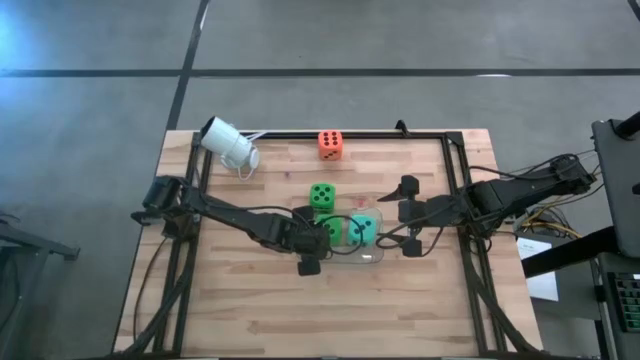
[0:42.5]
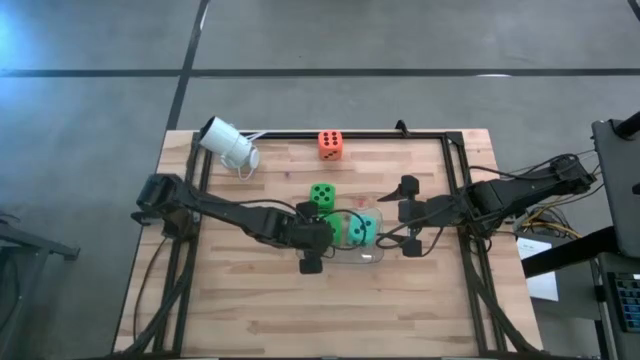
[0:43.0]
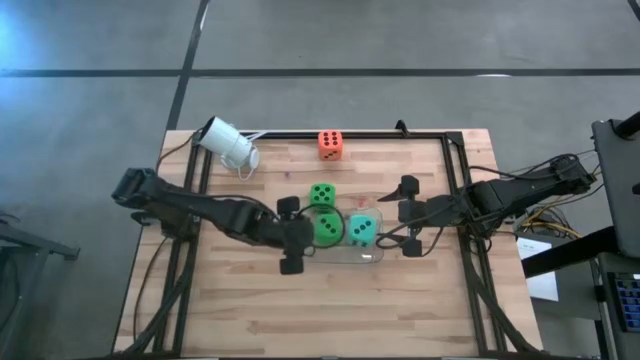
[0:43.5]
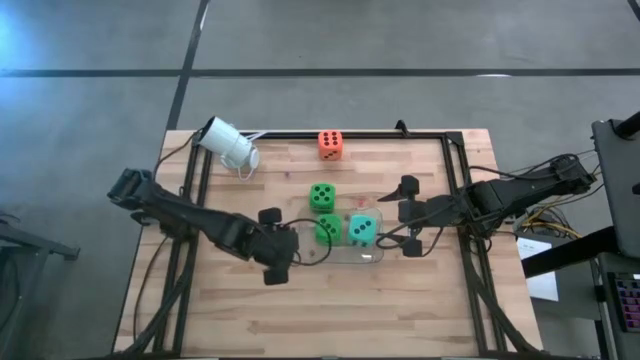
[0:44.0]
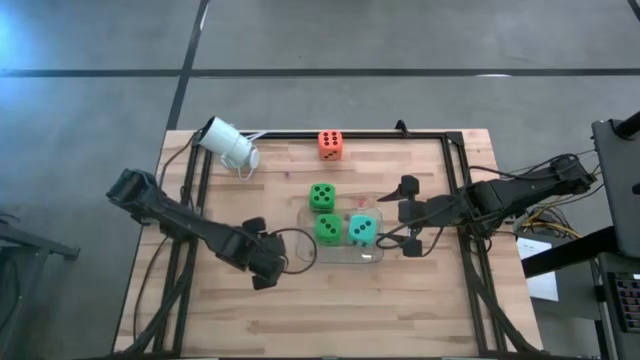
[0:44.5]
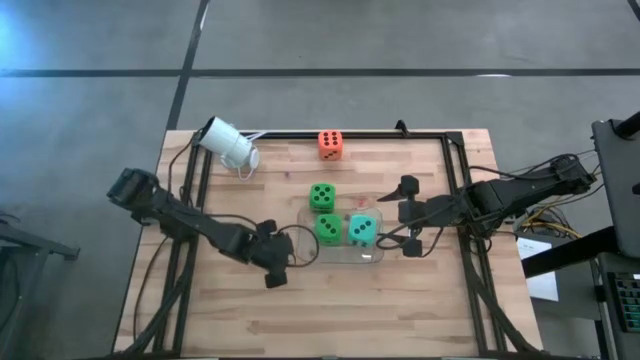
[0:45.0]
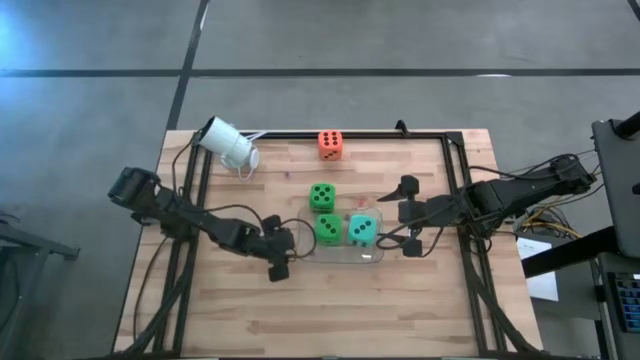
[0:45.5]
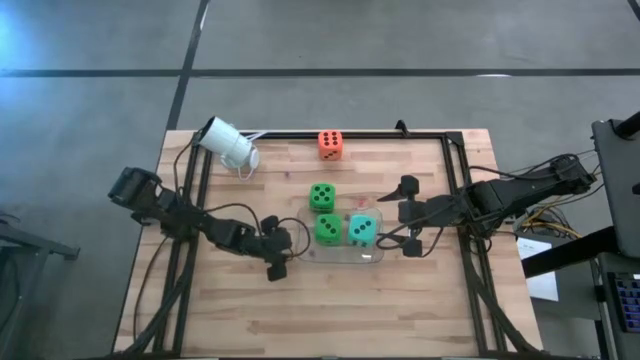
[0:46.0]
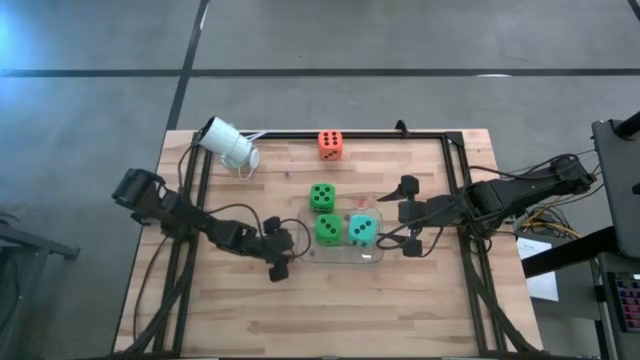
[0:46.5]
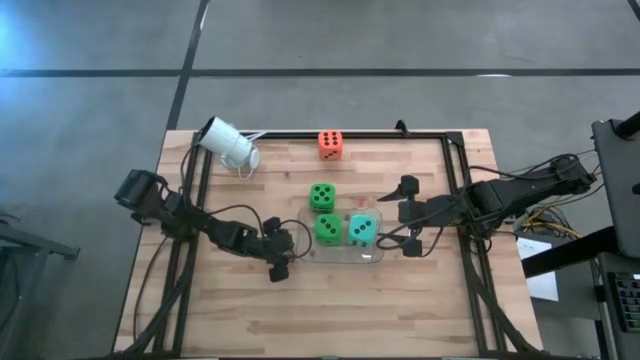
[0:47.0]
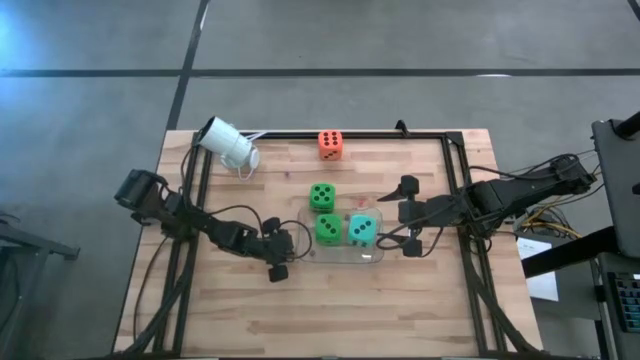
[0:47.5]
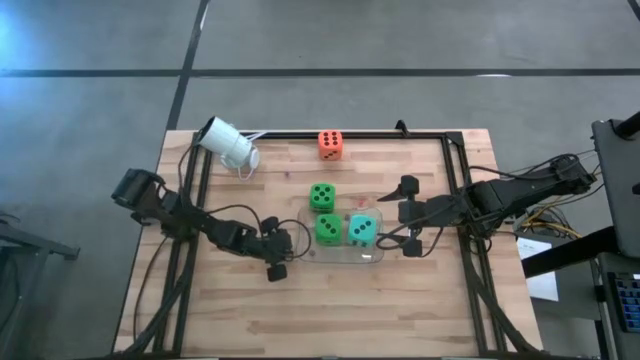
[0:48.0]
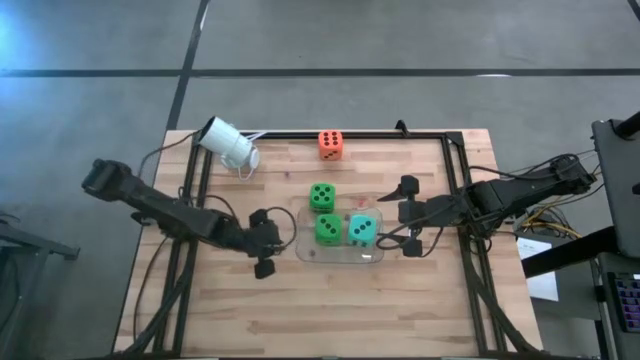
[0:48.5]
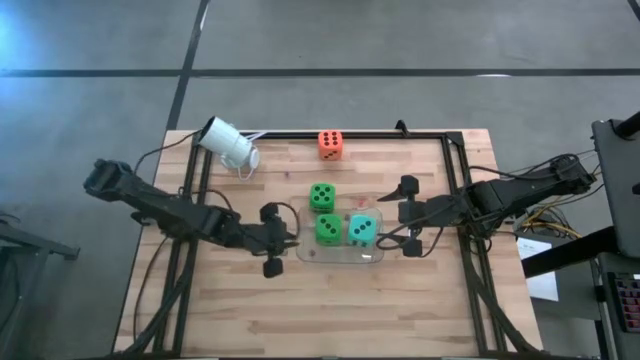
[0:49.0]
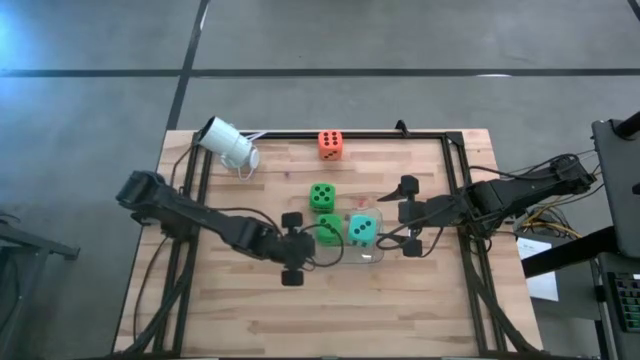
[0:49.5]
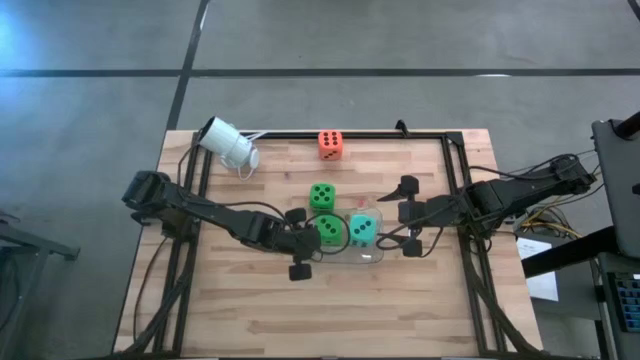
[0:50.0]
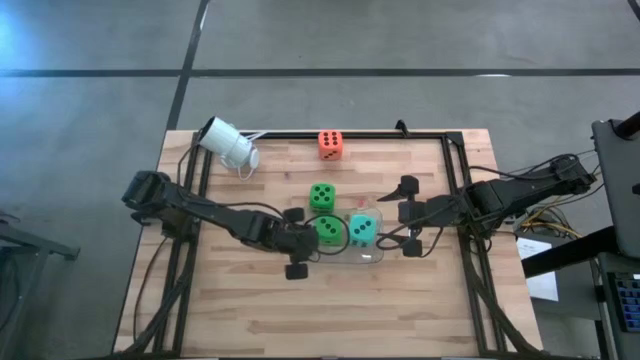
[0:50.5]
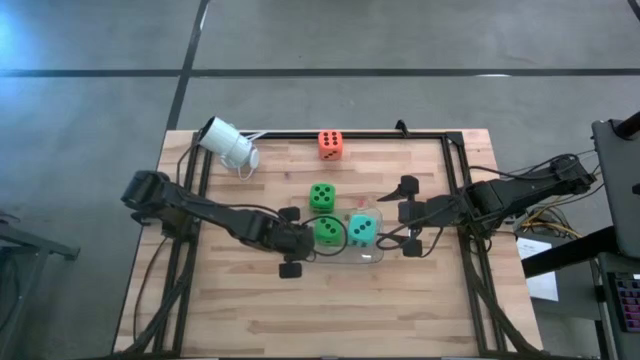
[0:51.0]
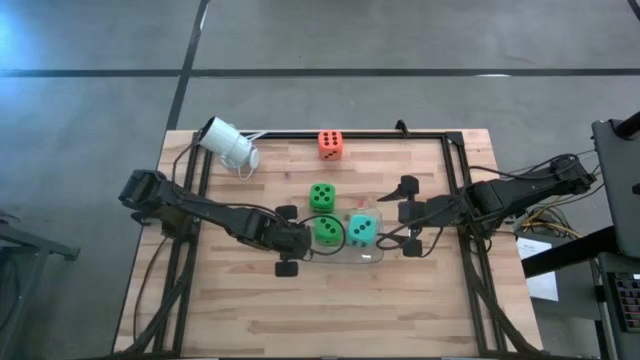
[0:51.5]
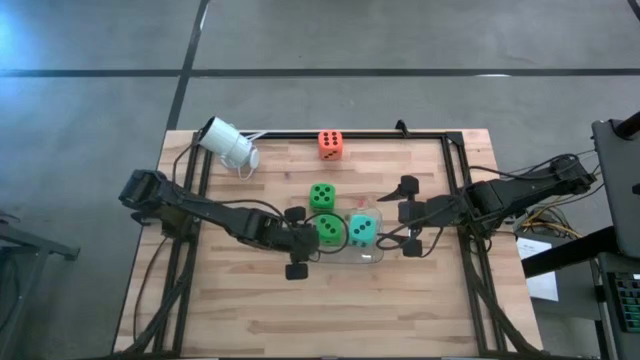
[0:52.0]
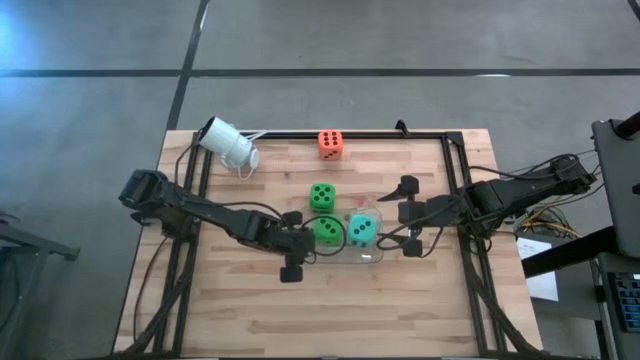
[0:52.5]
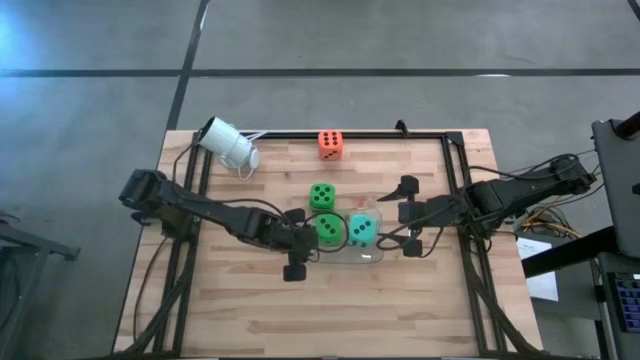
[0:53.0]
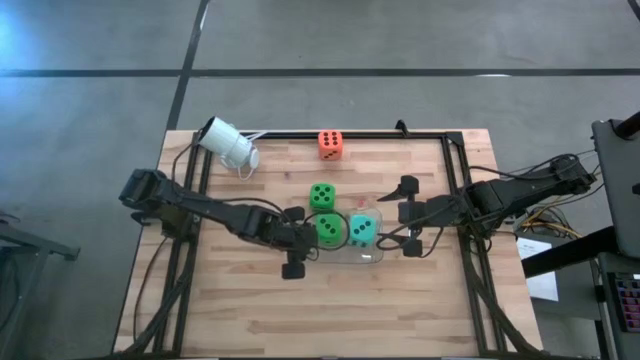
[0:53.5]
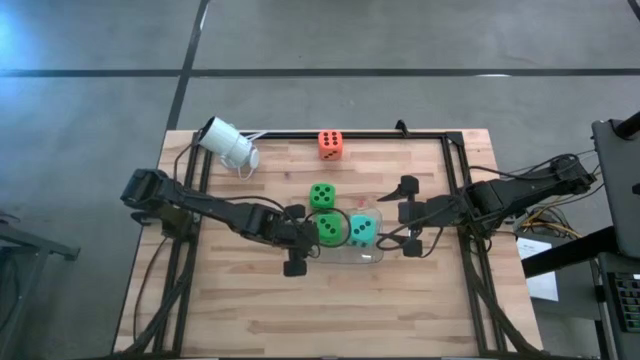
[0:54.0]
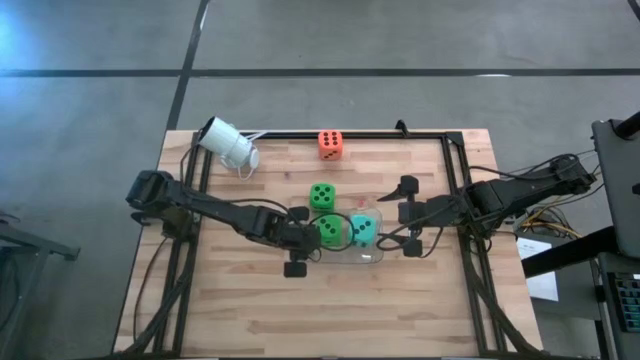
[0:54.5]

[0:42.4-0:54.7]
Task: Pick & Place Dice
Put the small yellow die into the transparent bin

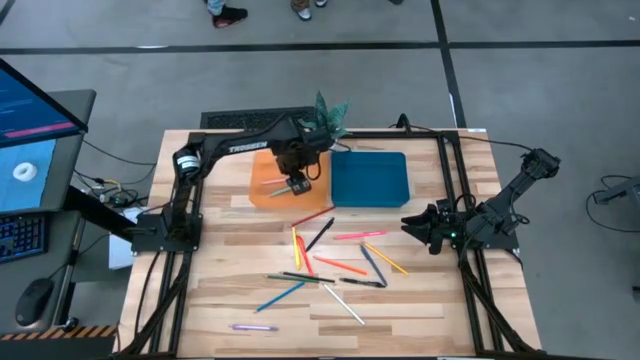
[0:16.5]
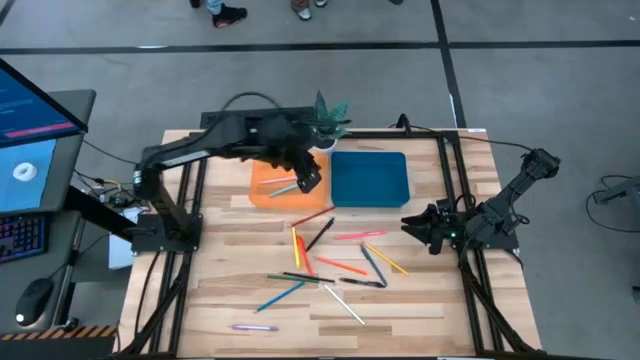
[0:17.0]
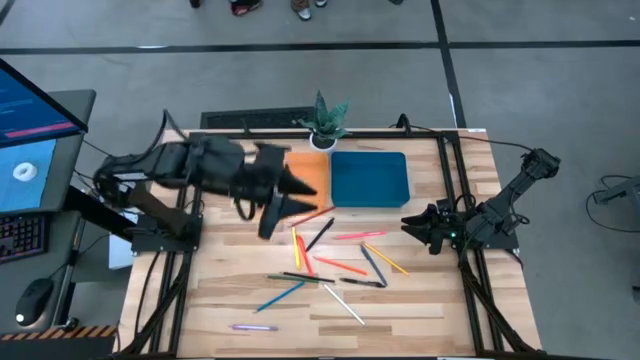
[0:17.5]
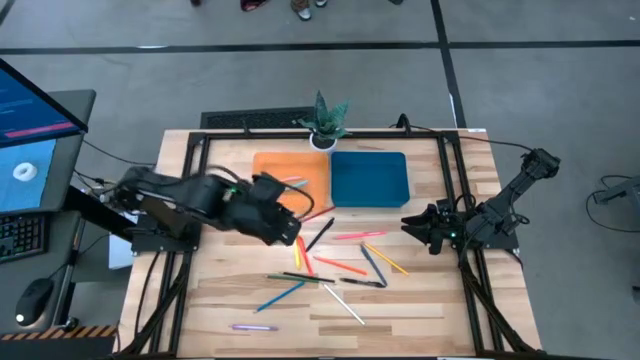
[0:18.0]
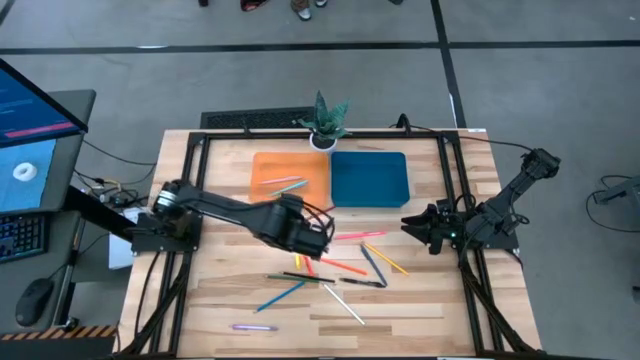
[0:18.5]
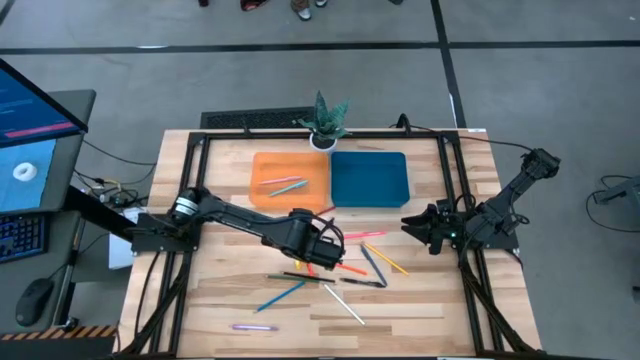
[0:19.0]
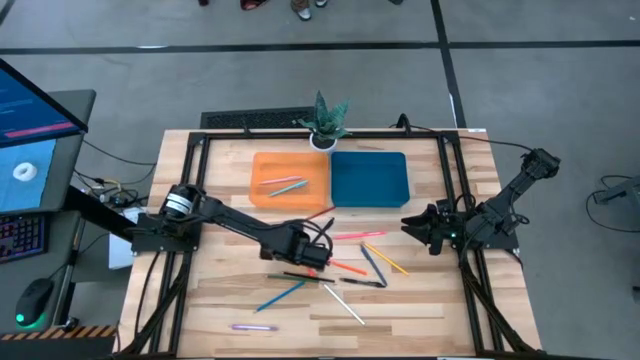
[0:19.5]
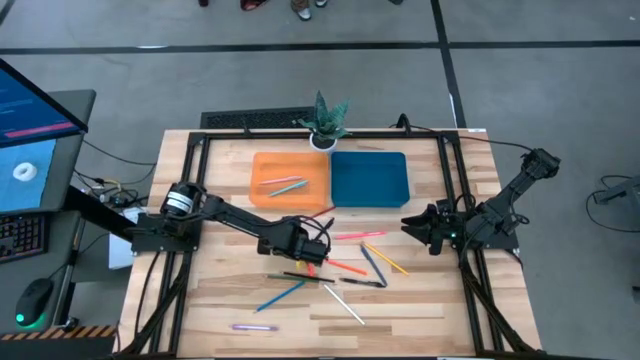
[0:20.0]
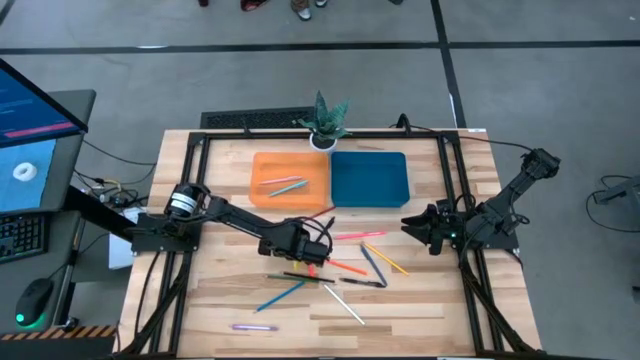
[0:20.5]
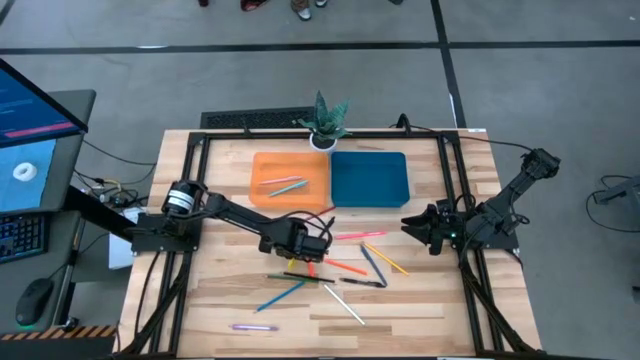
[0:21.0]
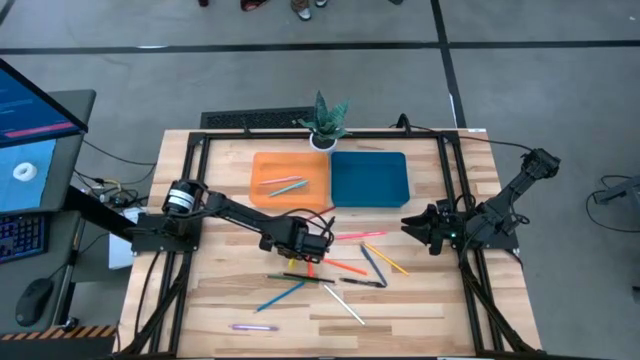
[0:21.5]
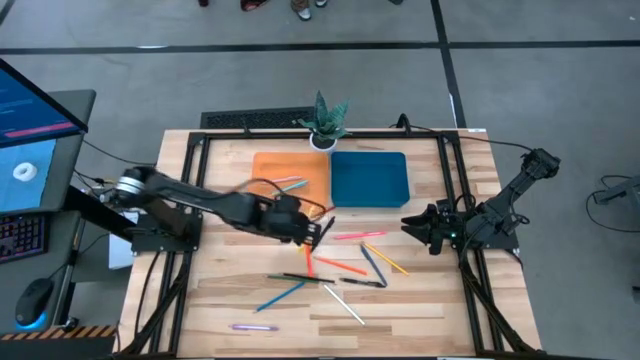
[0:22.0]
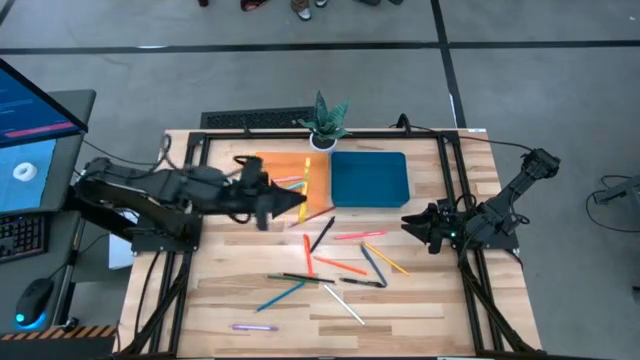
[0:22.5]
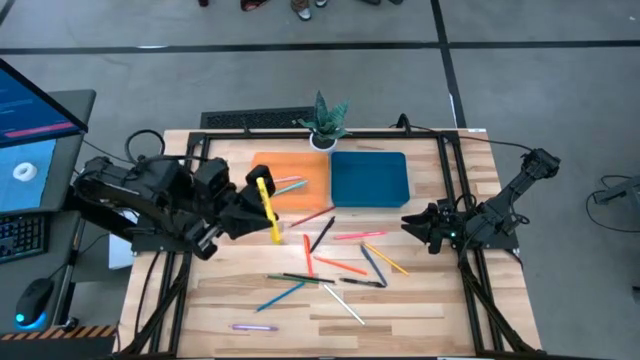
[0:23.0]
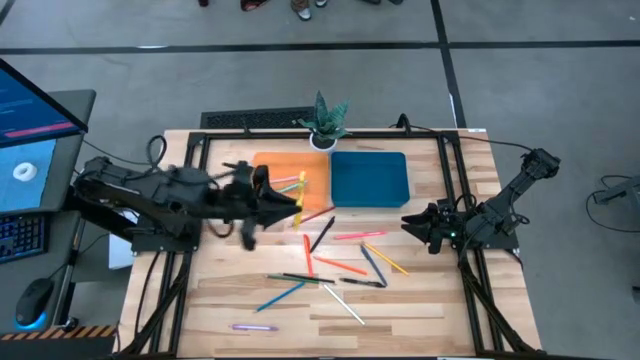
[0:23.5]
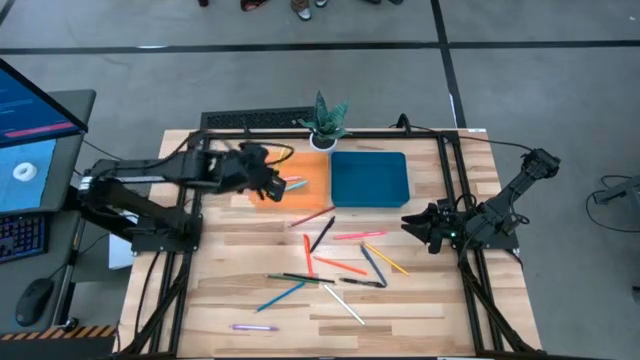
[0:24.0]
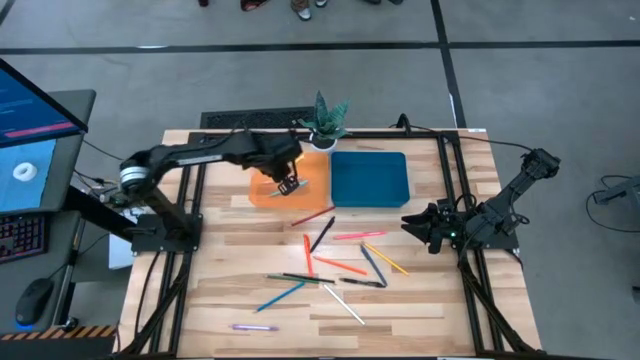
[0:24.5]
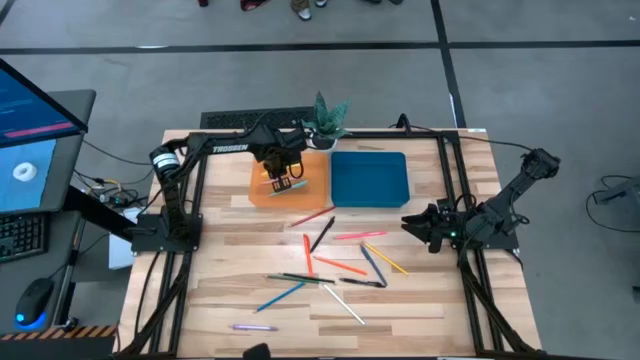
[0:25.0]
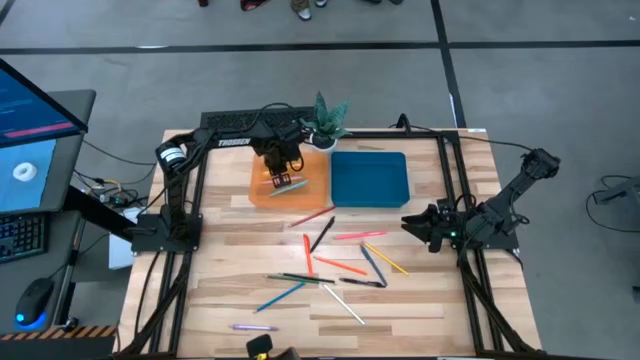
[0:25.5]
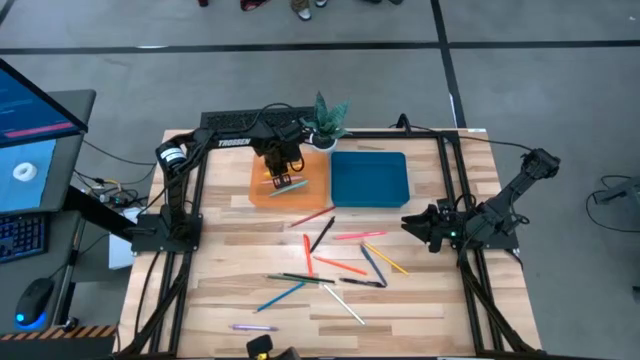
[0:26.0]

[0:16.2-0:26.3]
Task: Sort pens & pencils
Put the yellow pen into the orange bin
